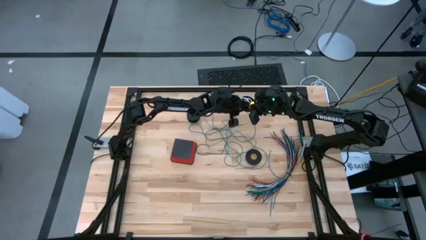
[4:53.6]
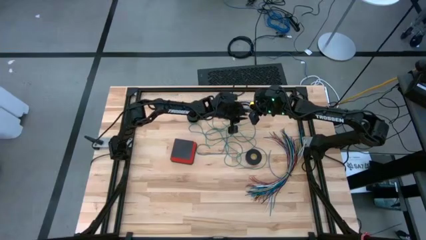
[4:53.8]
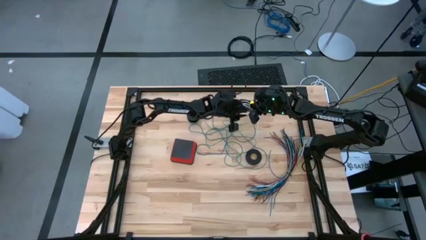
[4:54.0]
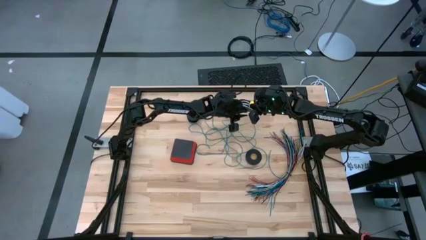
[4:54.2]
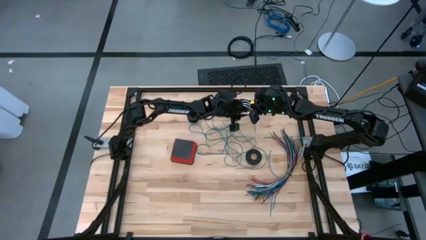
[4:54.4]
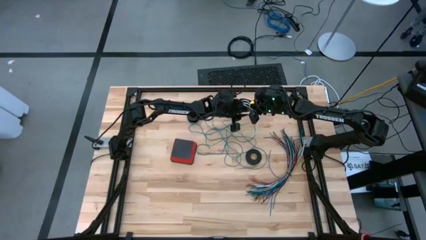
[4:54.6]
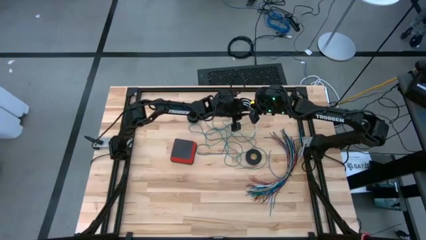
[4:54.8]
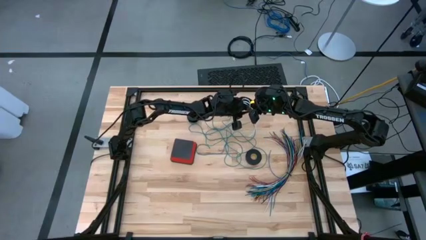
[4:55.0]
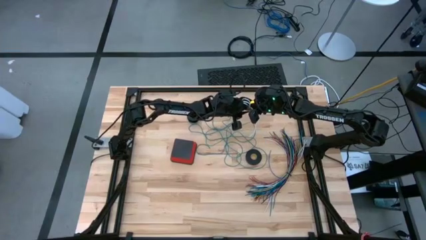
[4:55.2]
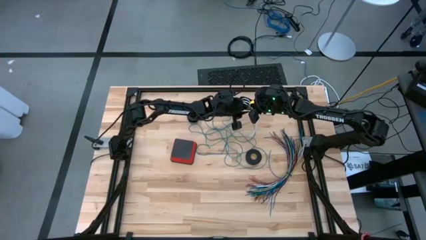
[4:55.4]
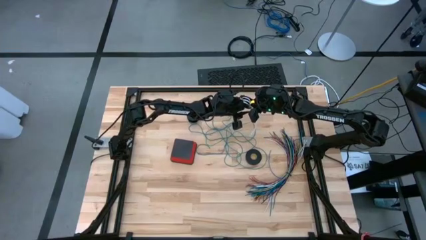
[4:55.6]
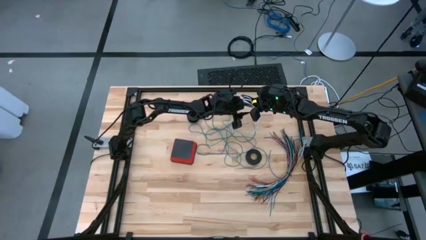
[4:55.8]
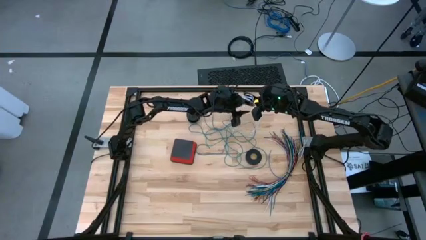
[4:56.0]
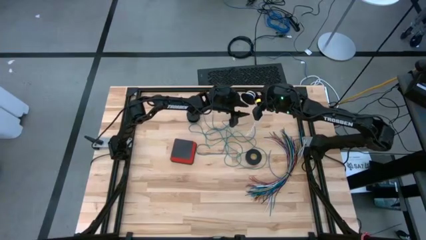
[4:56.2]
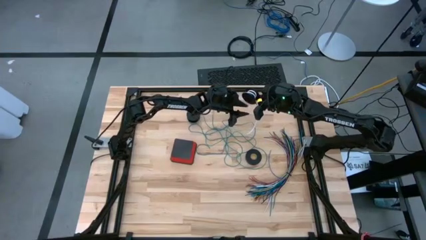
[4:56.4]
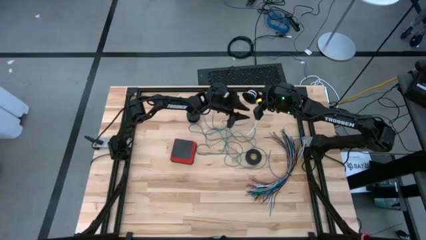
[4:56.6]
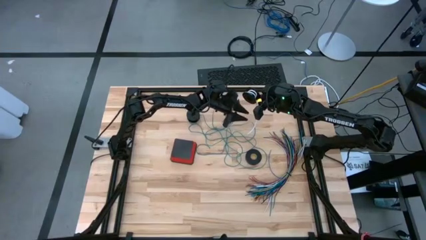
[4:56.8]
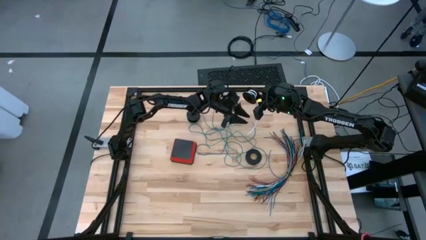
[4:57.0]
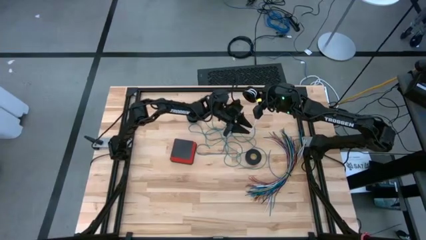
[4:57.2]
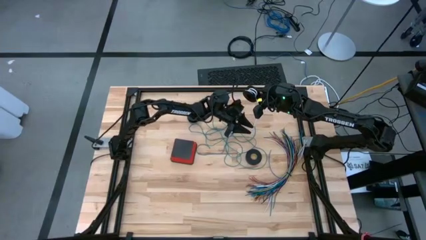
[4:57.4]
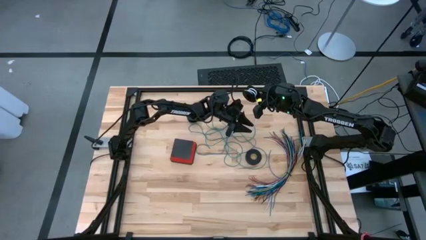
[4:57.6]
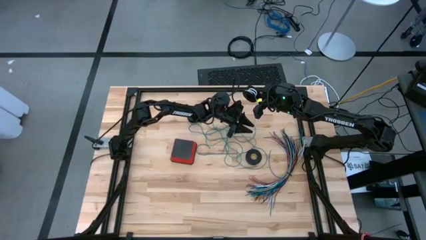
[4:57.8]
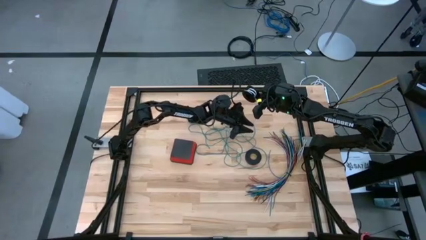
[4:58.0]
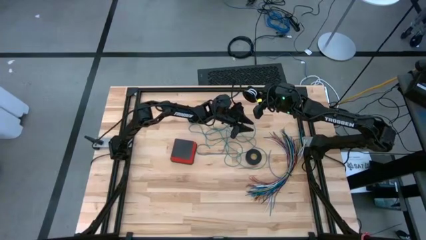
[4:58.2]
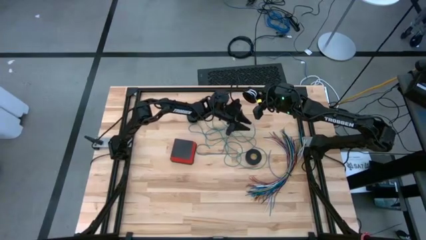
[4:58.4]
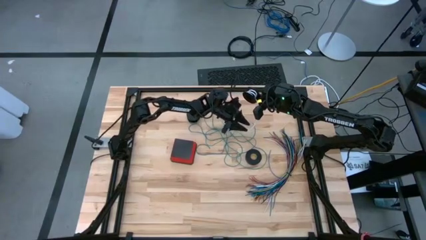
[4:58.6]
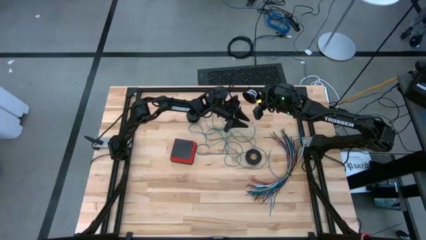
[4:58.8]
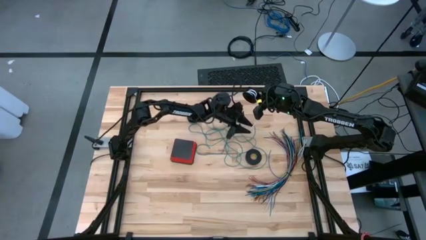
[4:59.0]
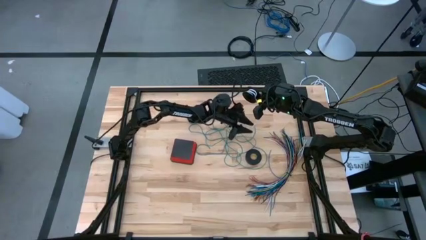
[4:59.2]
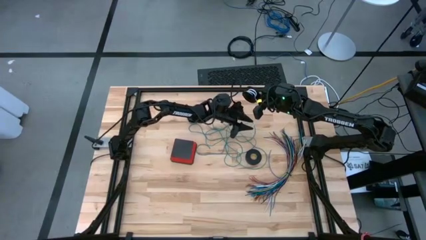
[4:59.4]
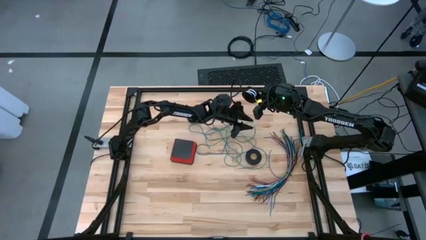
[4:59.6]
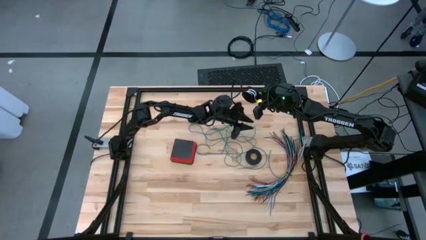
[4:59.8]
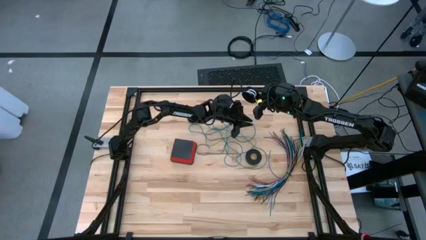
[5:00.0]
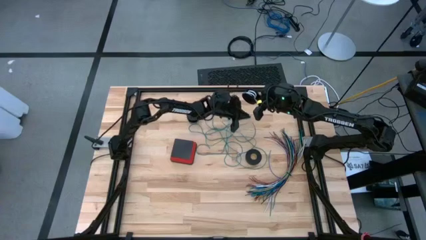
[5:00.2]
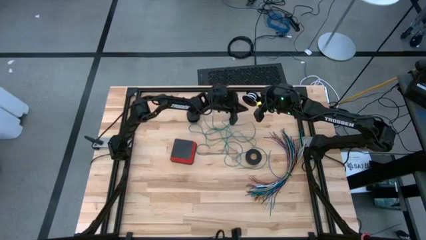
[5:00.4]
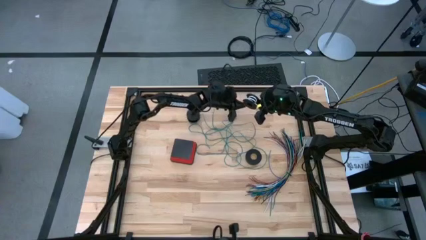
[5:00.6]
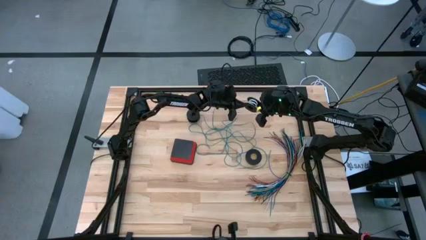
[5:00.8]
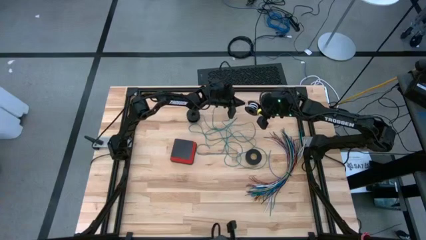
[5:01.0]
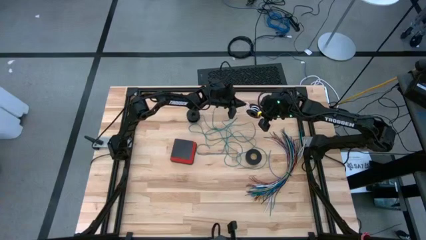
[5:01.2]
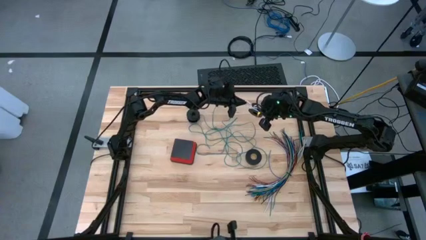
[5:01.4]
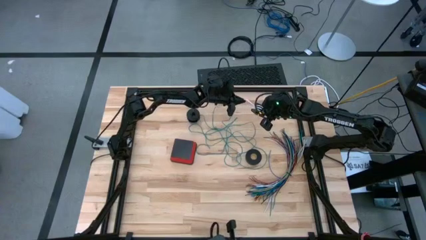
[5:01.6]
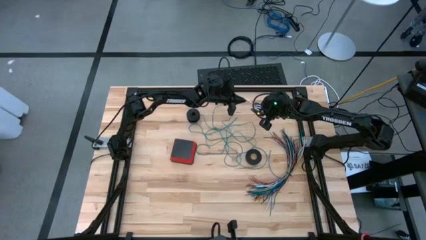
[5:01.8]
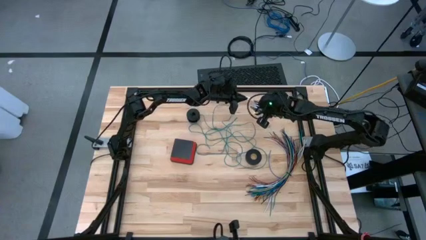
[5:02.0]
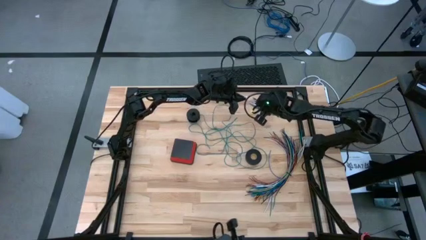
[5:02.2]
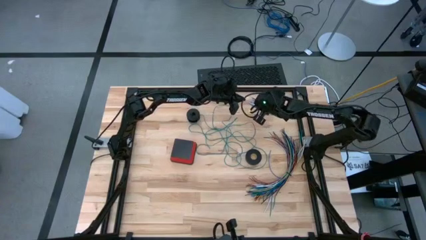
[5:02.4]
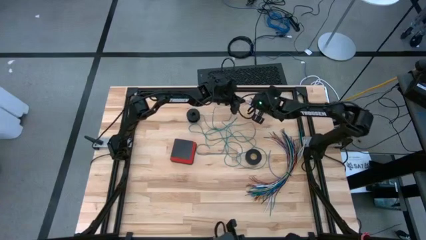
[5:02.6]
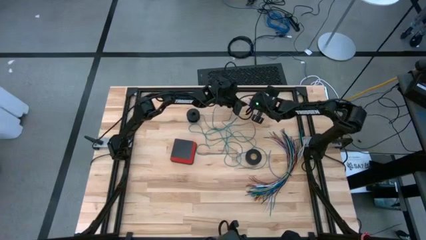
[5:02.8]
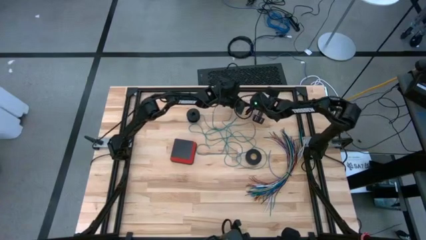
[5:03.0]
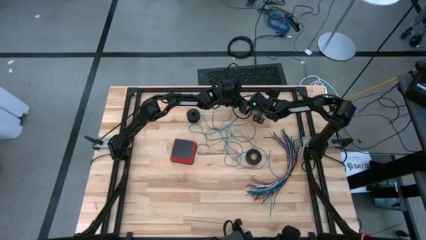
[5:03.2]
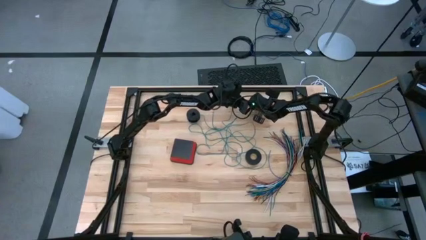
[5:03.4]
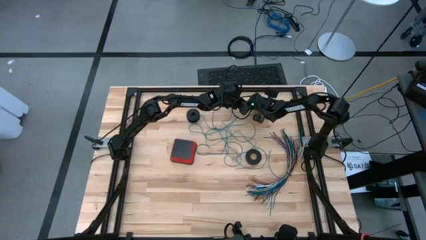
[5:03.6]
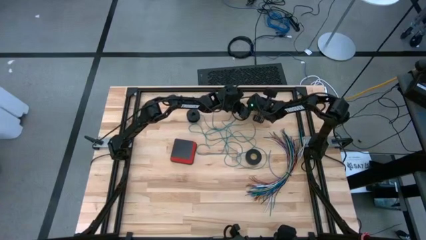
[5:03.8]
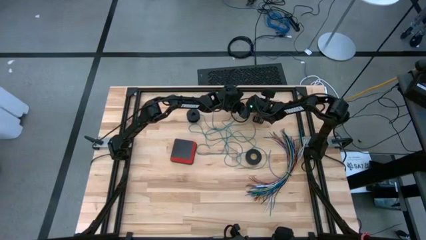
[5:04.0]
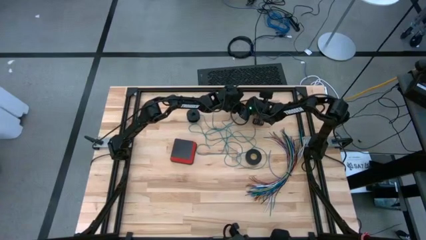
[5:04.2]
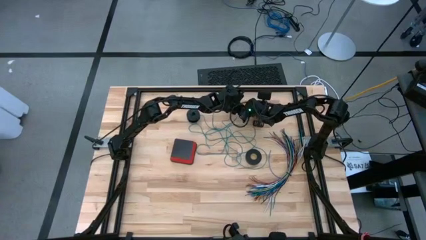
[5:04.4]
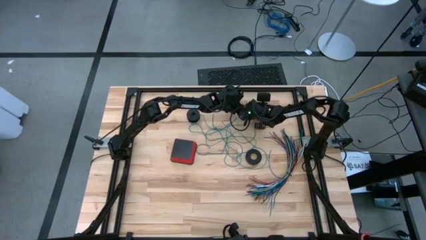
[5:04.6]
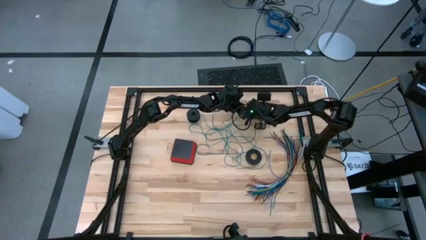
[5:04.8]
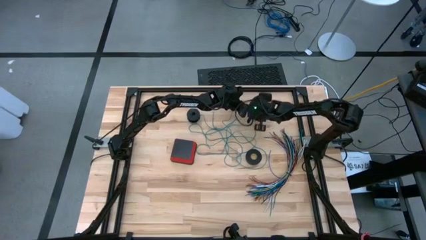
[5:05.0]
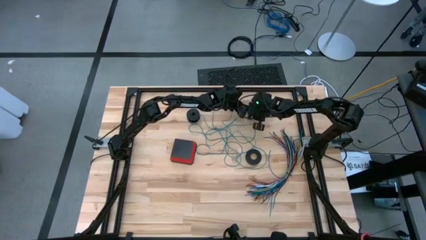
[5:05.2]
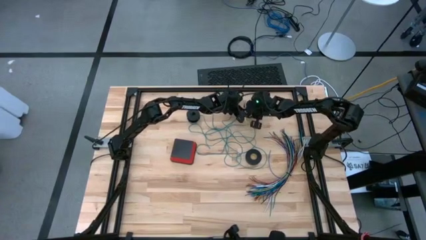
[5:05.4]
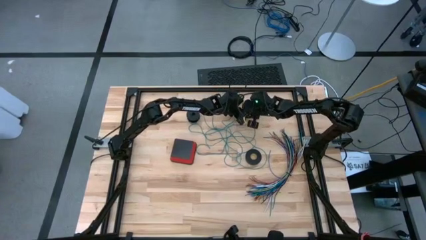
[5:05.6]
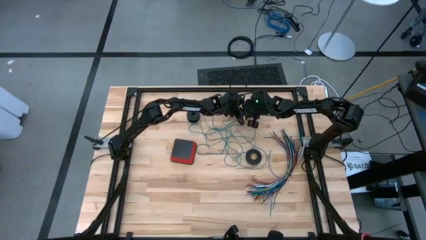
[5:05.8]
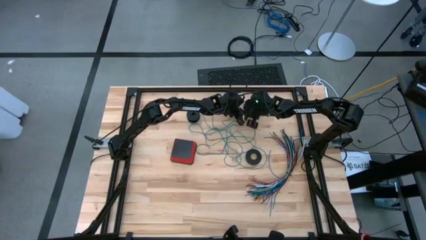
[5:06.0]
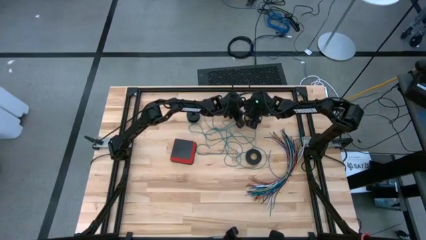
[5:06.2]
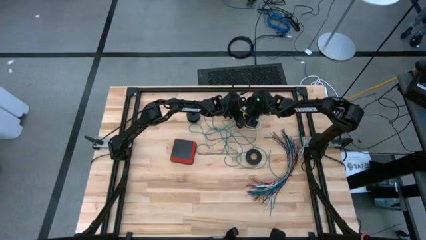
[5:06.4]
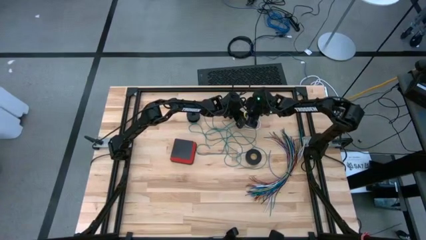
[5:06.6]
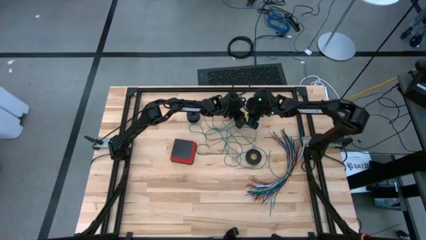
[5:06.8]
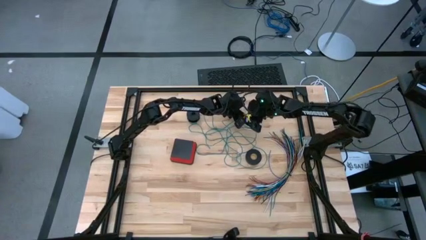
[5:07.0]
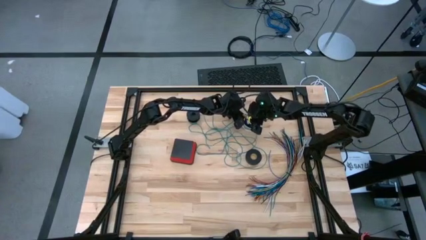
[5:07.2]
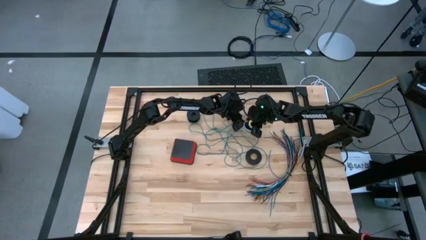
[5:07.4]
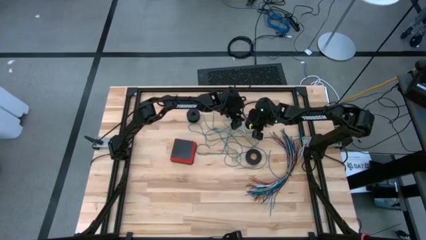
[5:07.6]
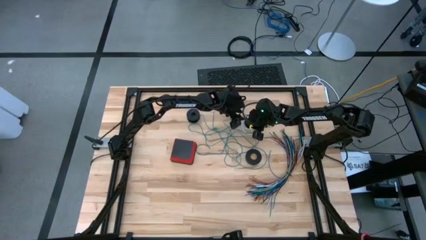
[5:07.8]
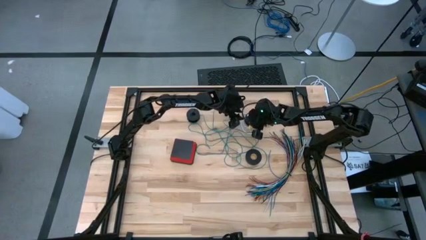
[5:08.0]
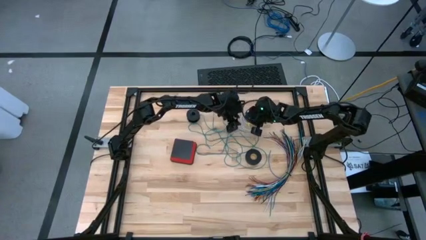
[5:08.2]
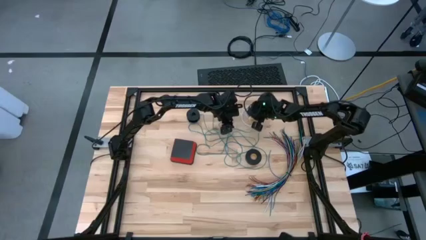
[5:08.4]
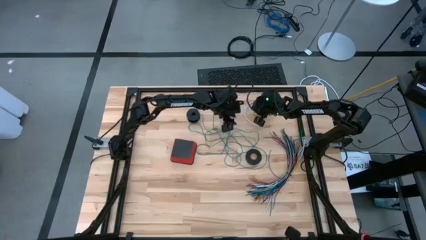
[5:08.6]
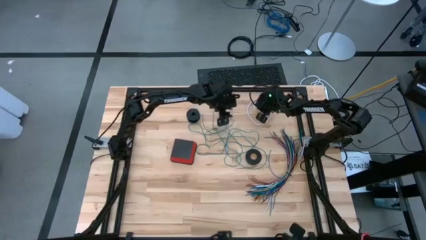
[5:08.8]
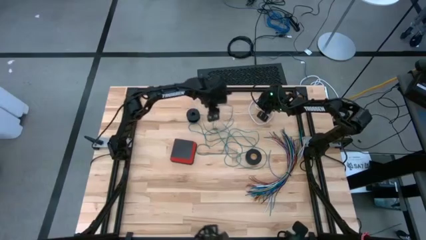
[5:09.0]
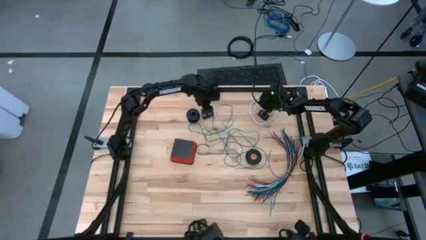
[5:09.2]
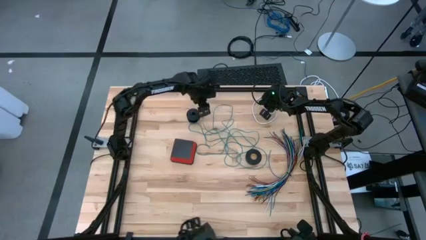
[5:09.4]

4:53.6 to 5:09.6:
Task: Coiling cords
Coil the white wire cable on the spool
